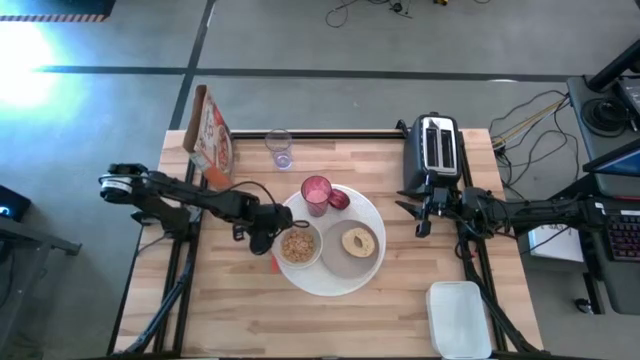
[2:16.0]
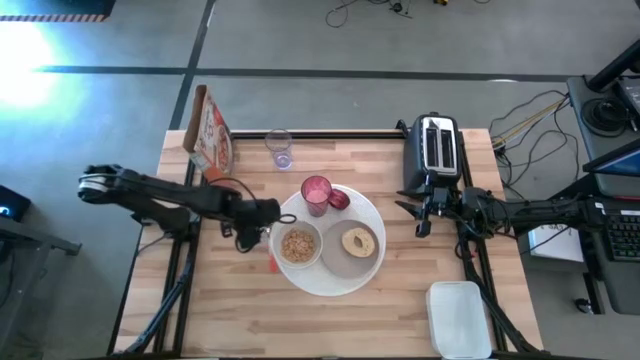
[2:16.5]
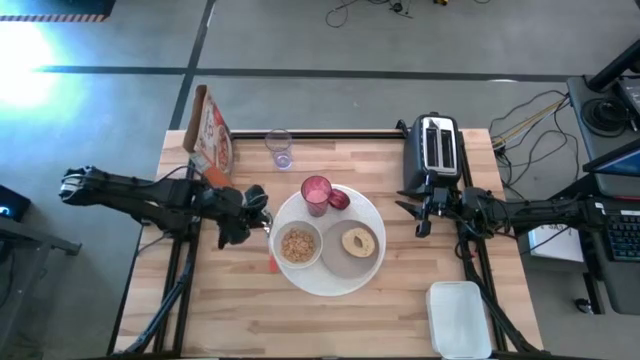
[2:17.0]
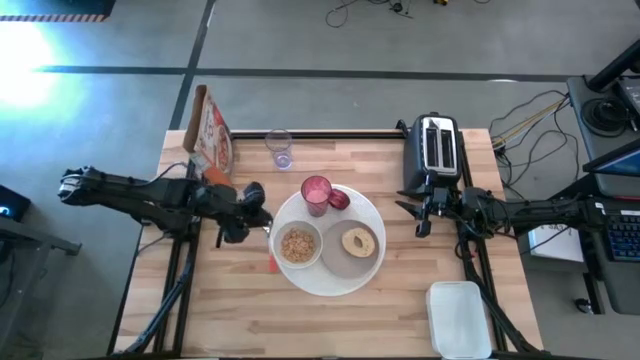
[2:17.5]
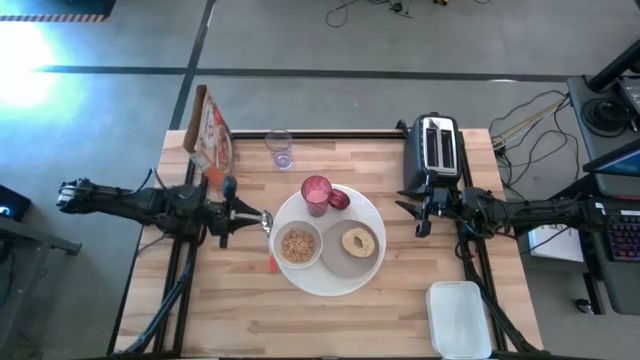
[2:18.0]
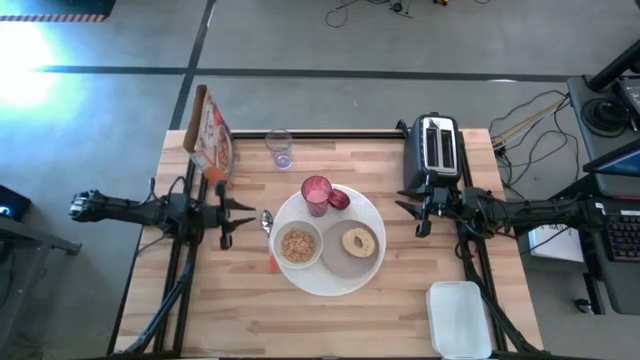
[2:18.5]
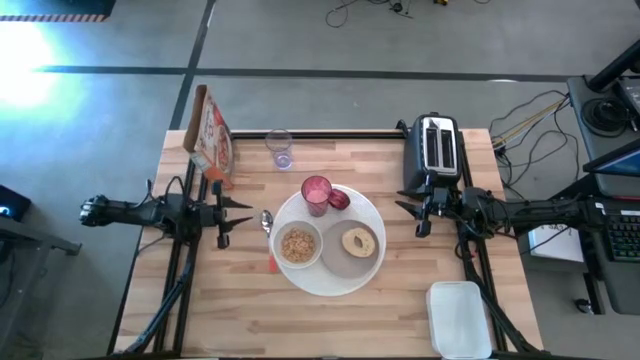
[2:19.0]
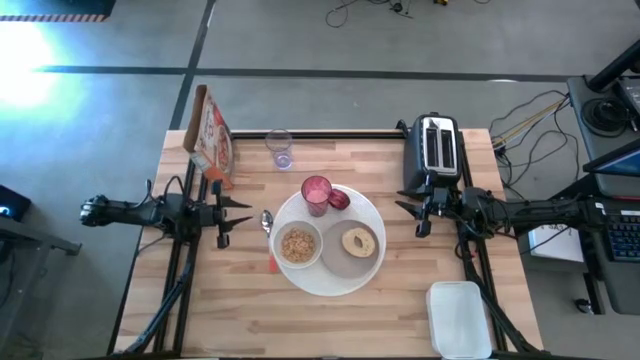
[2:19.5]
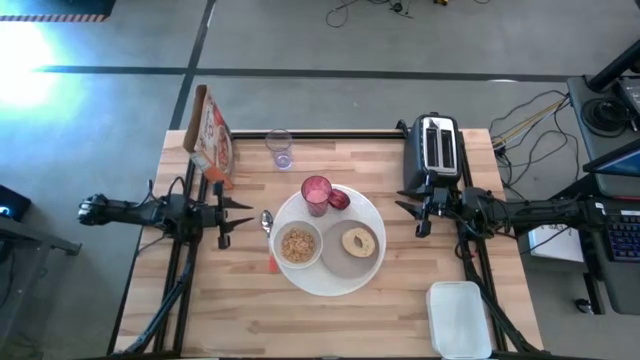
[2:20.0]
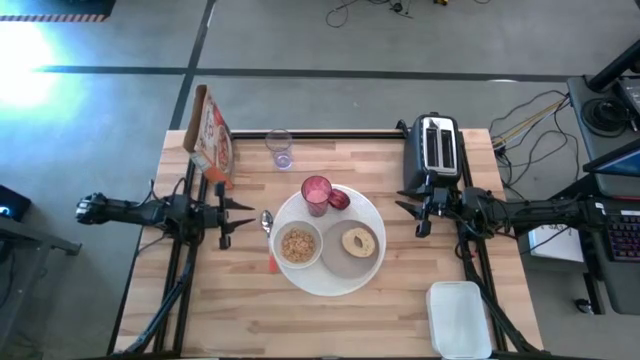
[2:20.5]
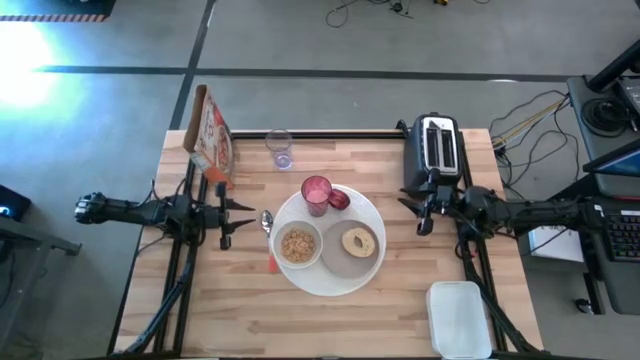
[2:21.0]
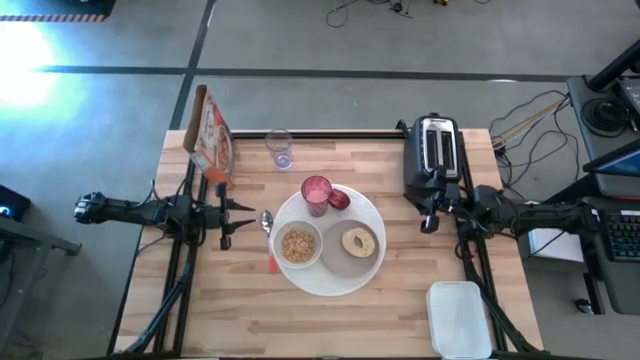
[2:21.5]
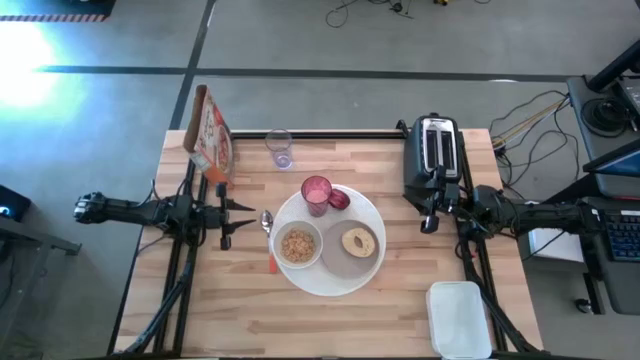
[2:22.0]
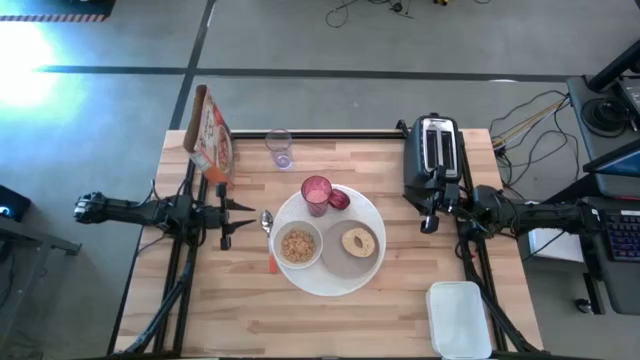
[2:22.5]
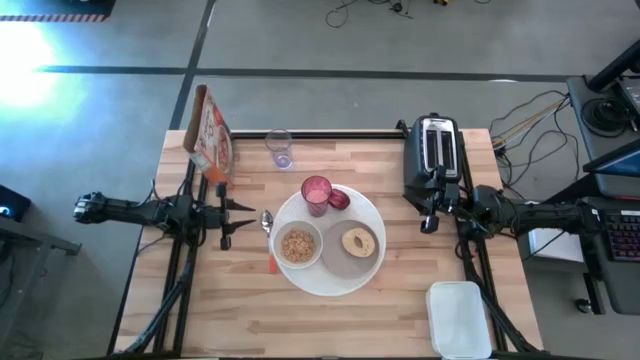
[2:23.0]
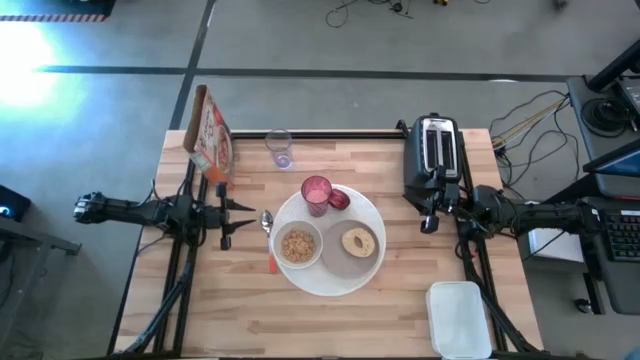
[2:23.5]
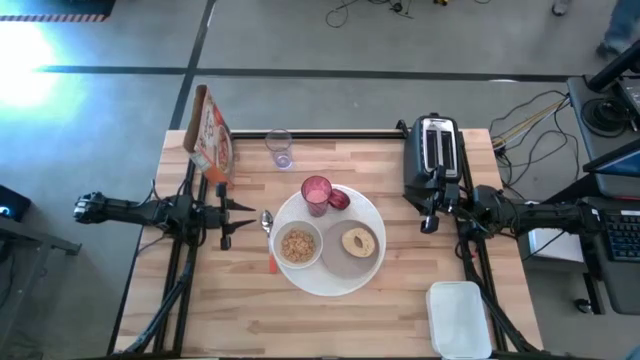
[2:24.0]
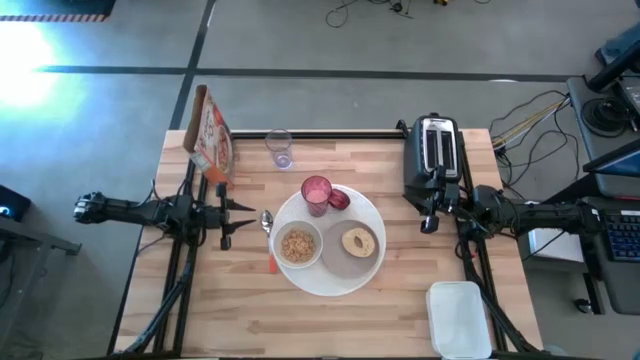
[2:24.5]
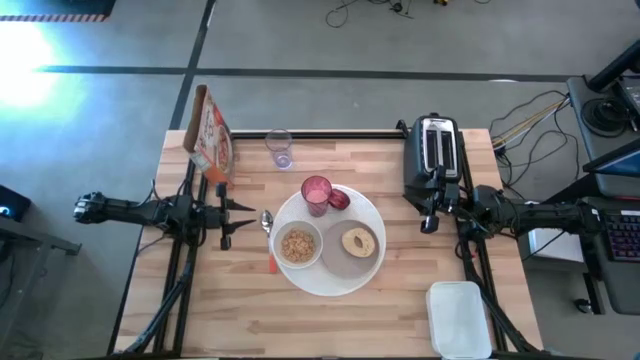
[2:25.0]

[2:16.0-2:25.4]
Task: Arrange a breakfast setting
Return to Home Position

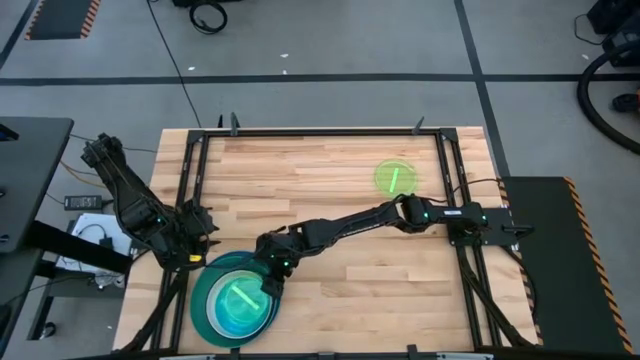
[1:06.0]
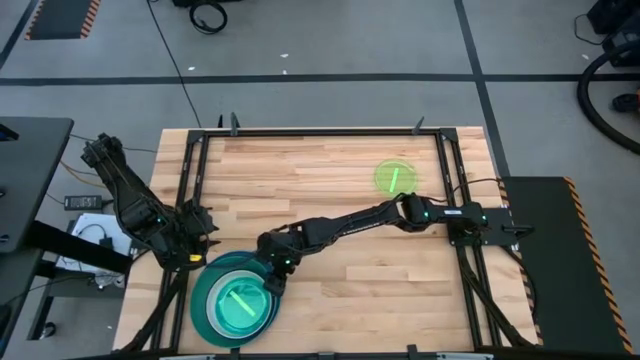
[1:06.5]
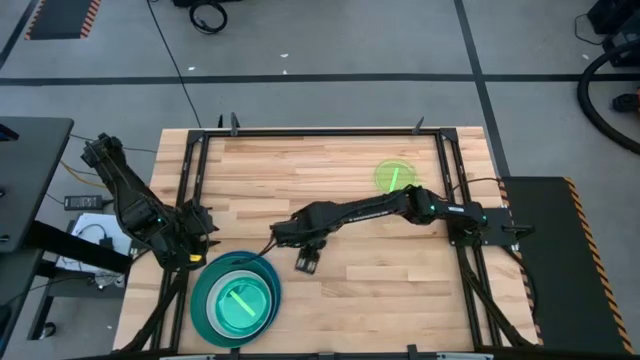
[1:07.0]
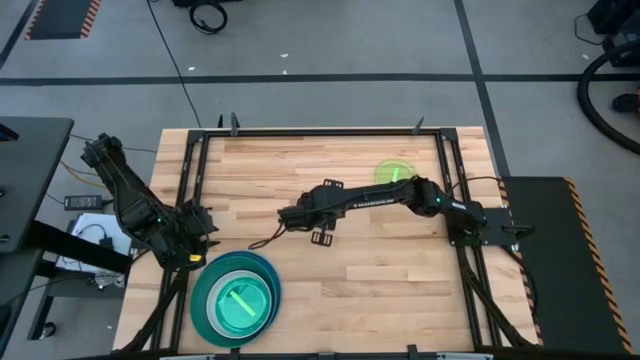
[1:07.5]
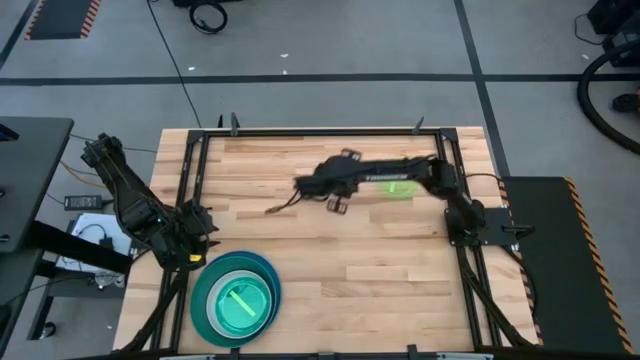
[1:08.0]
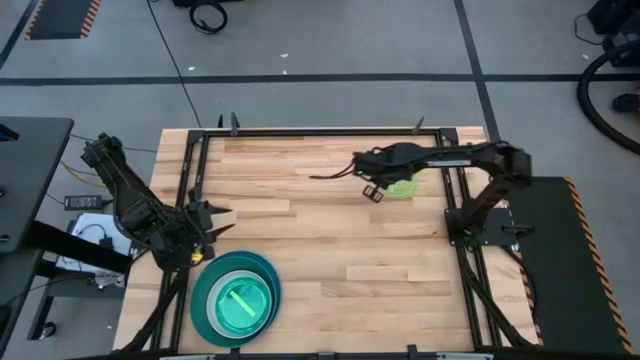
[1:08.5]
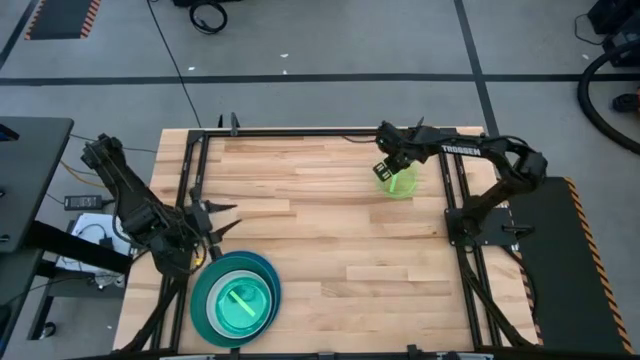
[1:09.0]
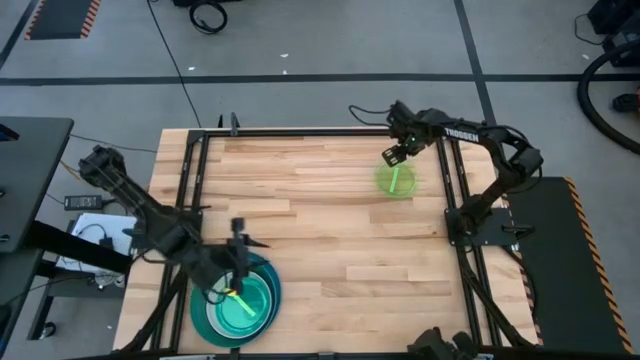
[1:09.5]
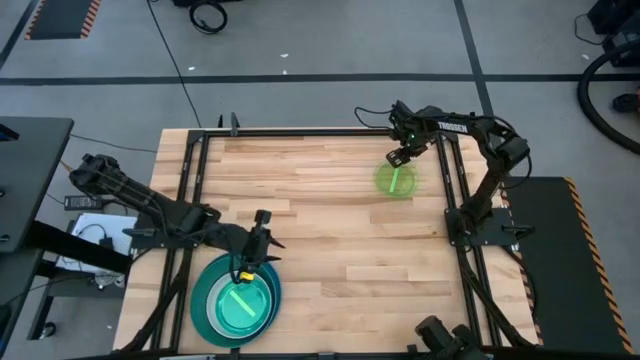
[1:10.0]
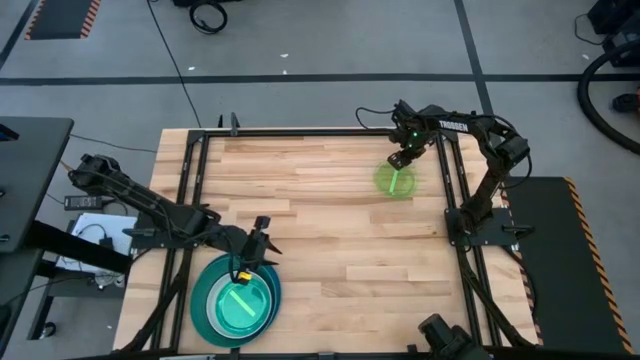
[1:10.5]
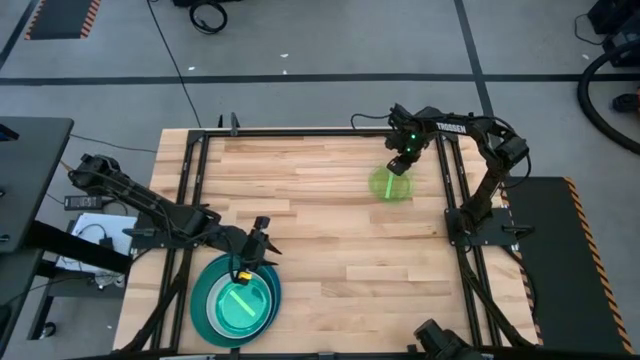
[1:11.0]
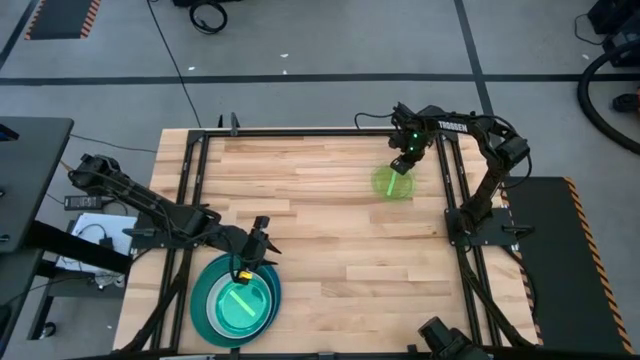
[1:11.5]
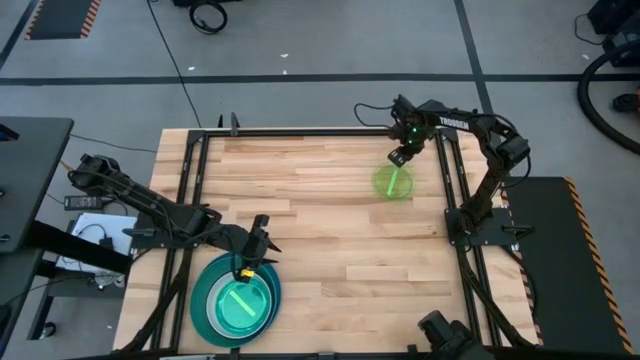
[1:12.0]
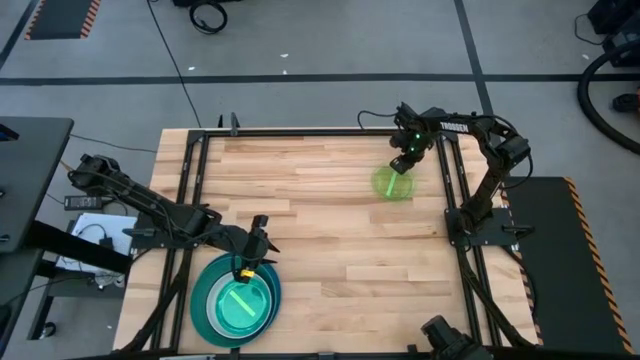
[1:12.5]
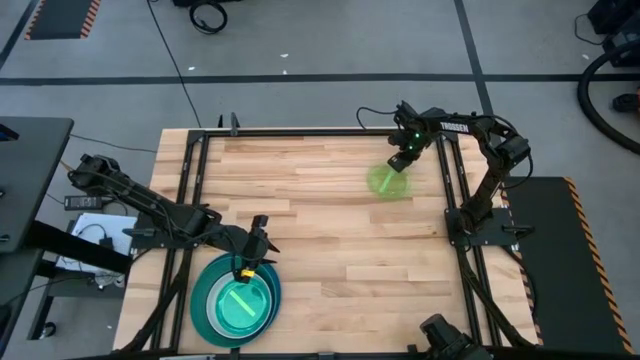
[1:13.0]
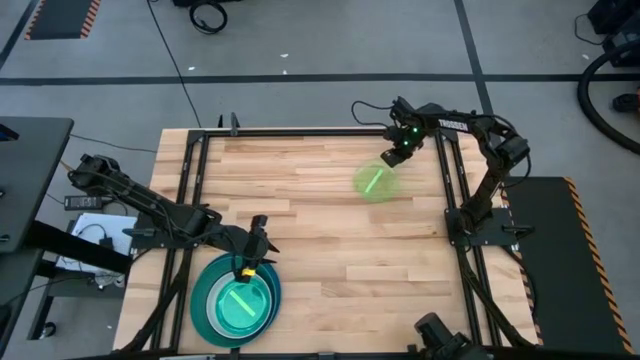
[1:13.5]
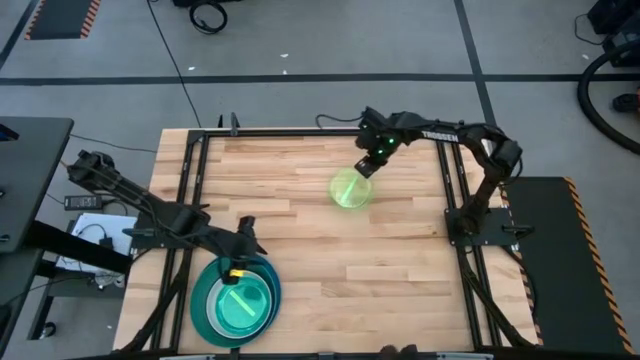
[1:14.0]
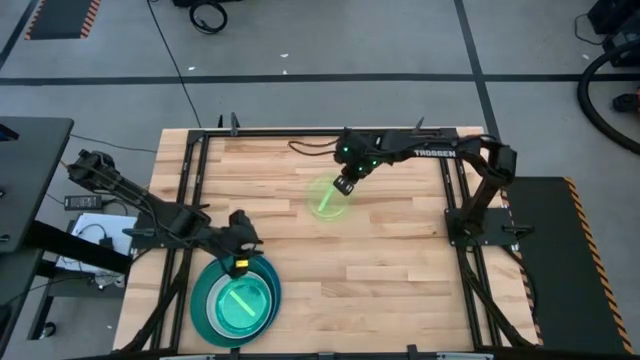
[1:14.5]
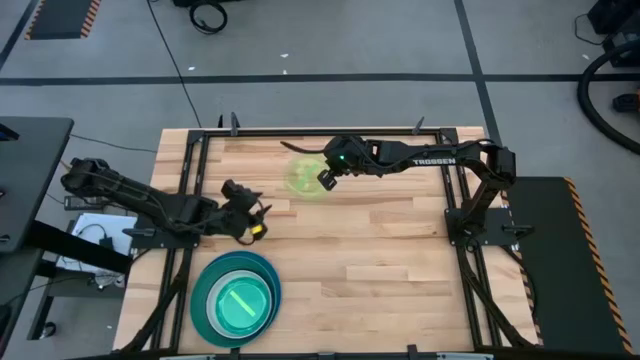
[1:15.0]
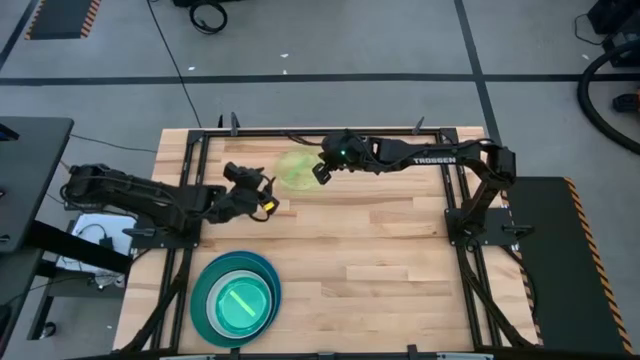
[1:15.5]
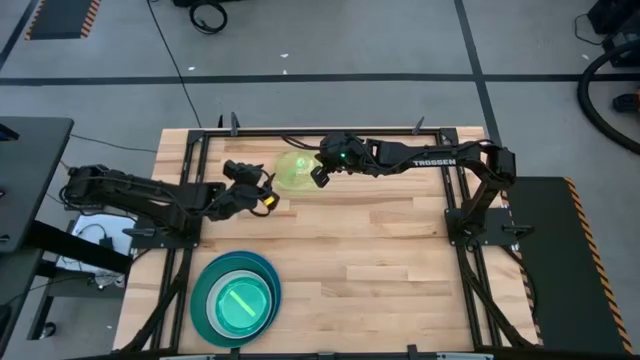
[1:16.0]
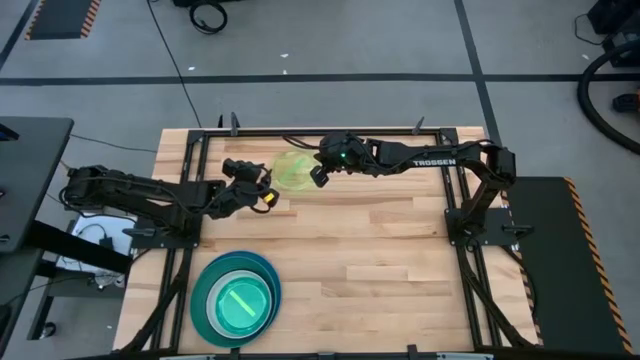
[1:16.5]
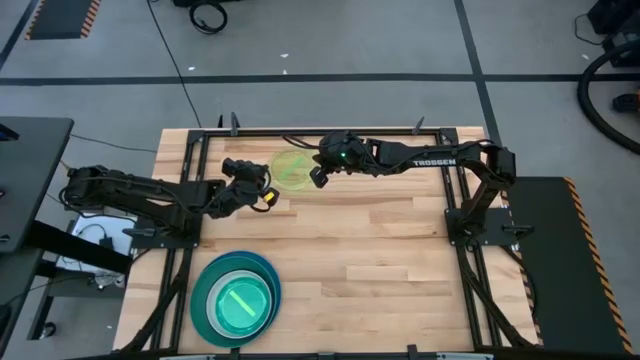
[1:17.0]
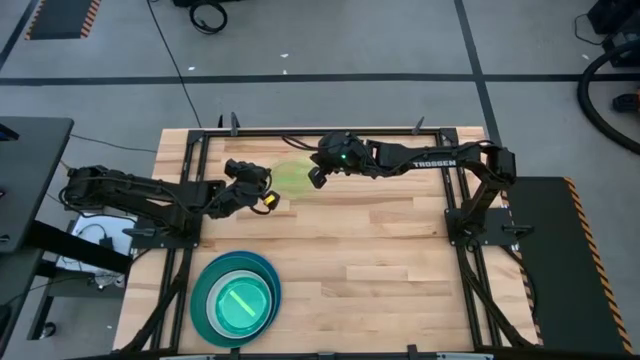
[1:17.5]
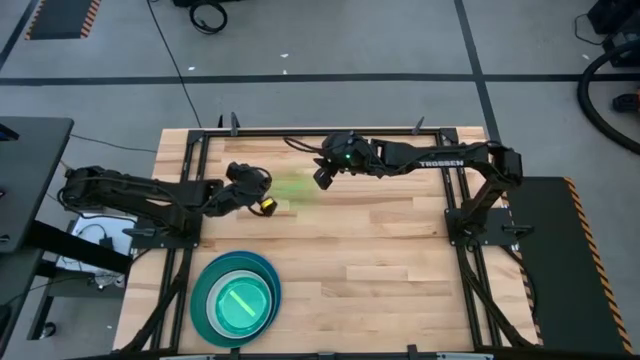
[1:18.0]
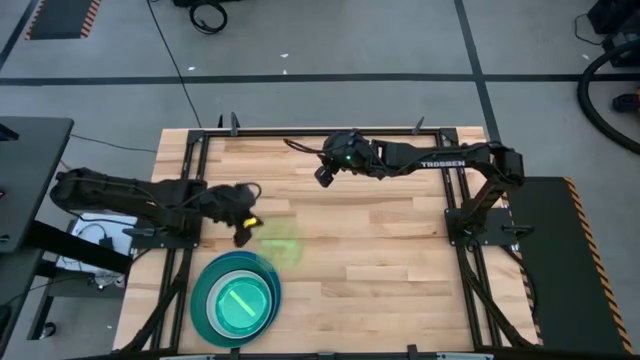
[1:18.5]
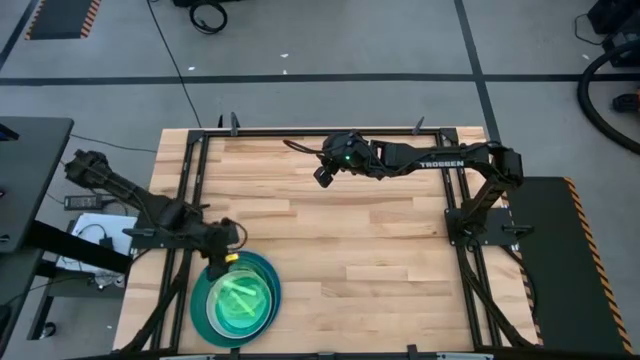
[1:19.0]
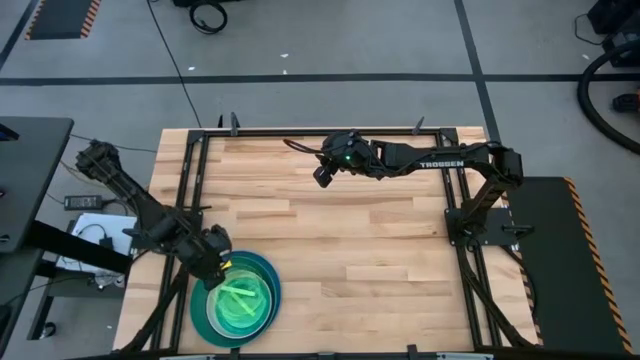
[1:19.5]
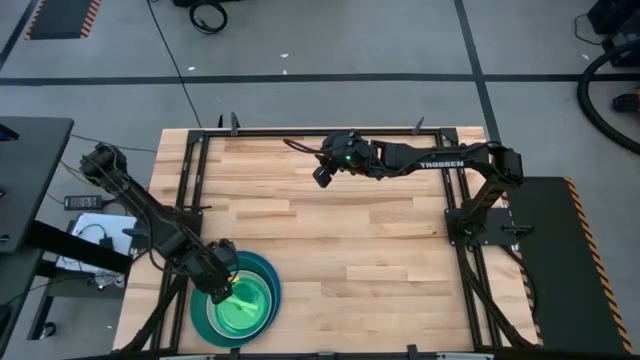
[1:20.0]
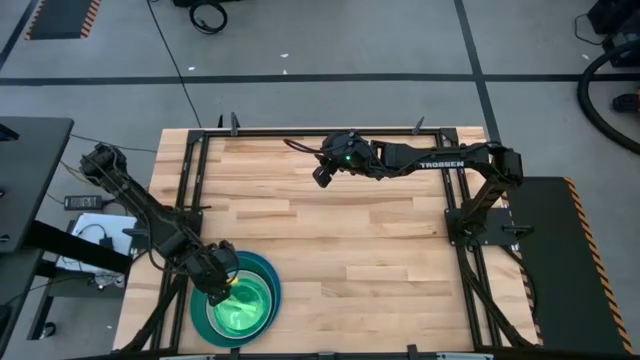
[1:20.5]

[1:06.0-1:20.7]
Task: Stack plastic plates
Stack the light green plate on top of the light green plate
